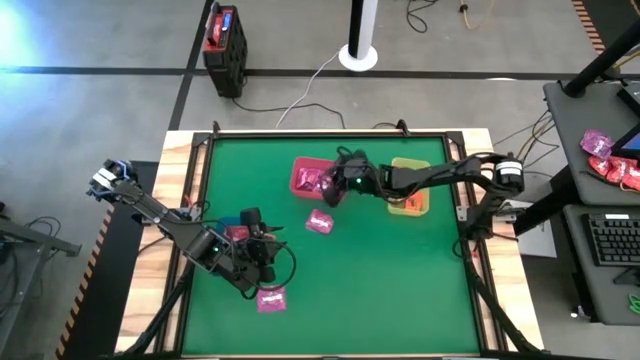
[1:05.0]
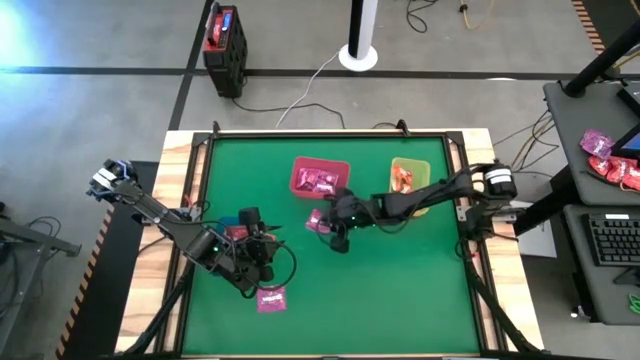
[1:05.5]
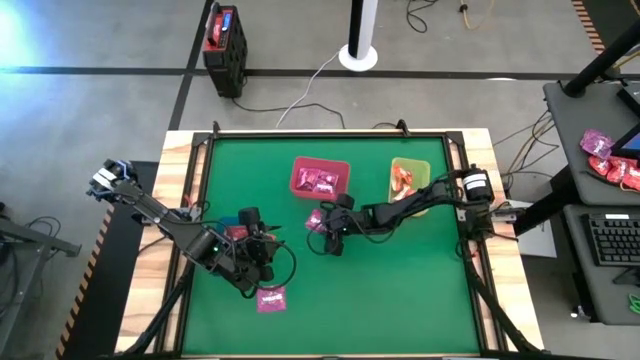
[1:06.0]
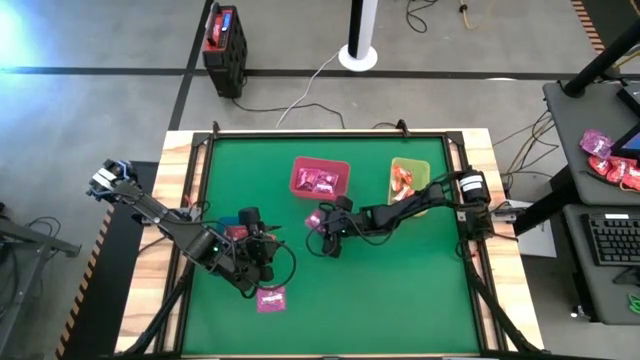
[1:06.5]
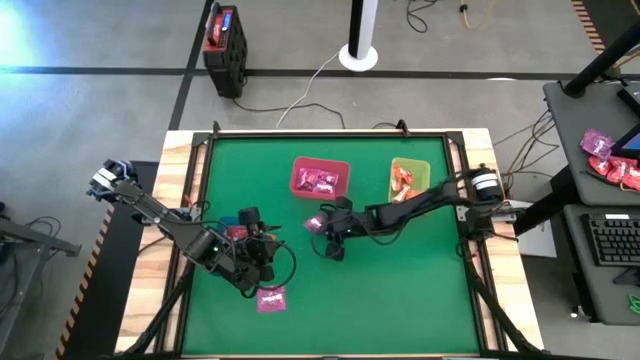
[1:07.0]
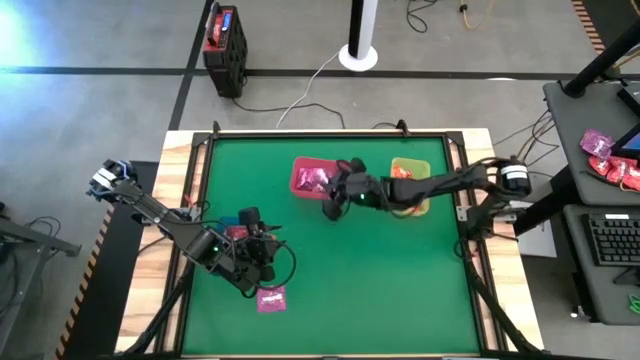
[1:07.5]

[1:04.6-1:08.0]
Task: Sort candy by brand, put in halloween buckets
Put the violet candy into the red bin

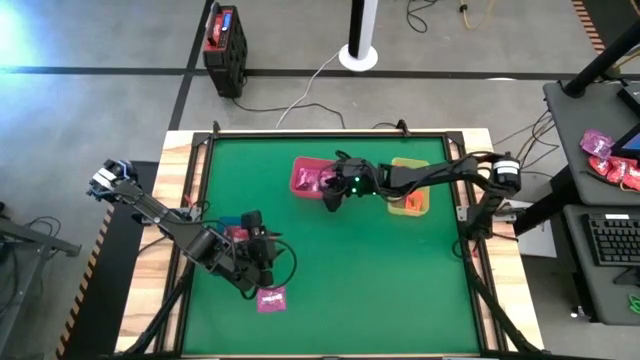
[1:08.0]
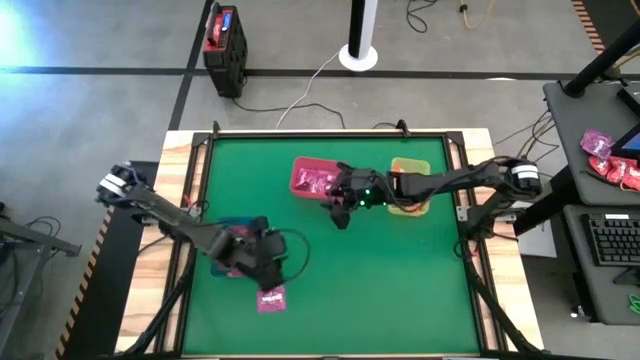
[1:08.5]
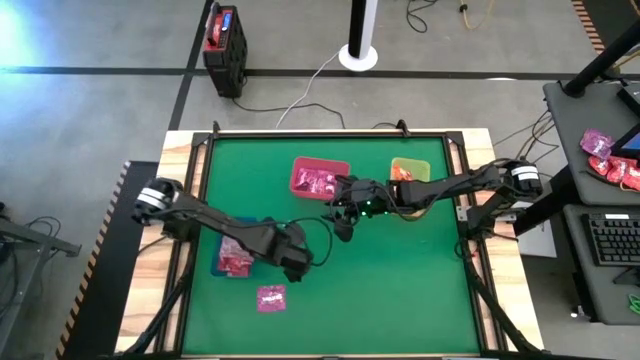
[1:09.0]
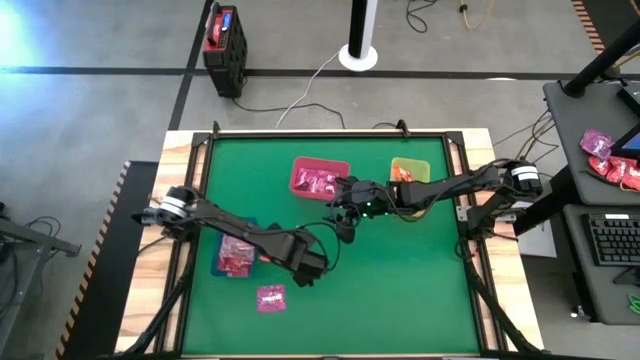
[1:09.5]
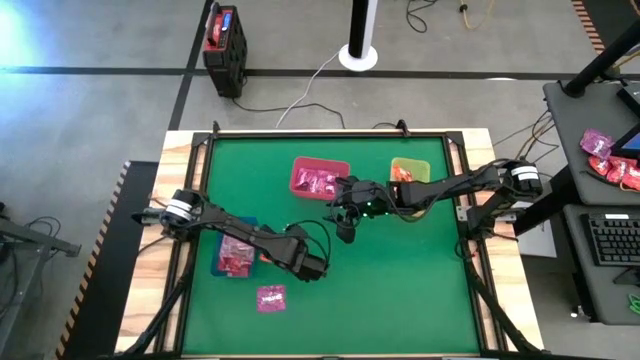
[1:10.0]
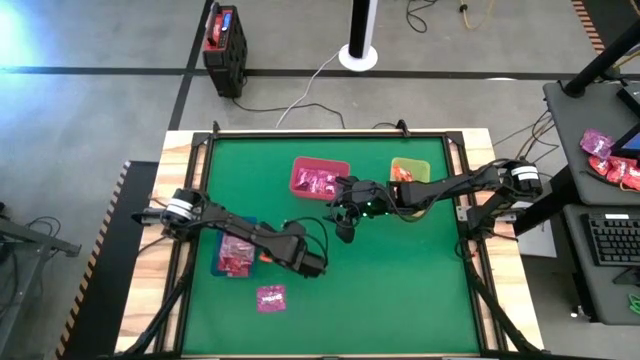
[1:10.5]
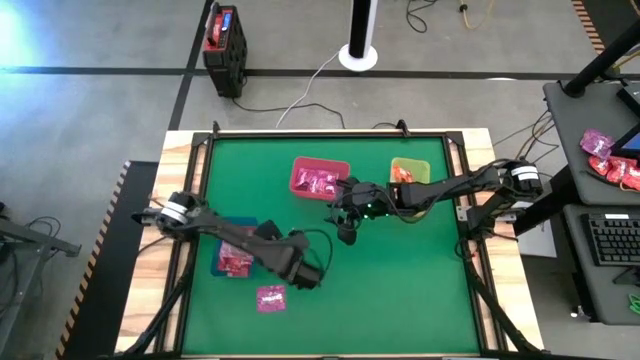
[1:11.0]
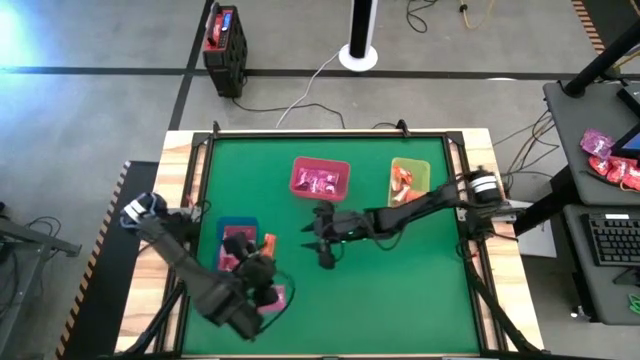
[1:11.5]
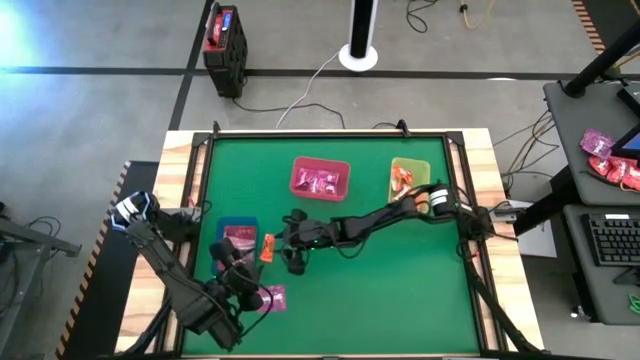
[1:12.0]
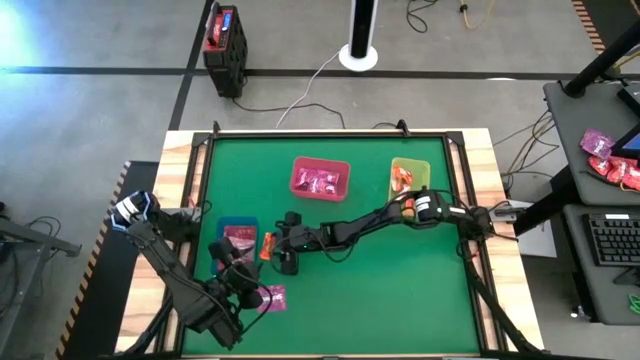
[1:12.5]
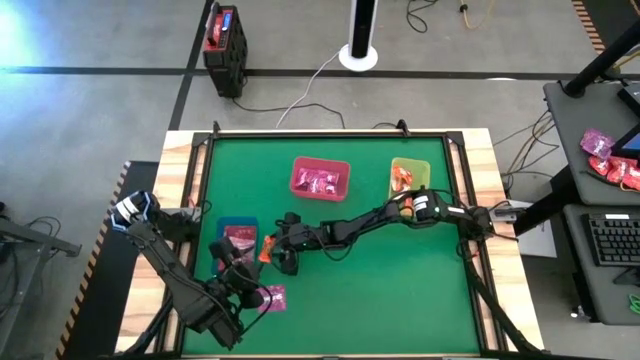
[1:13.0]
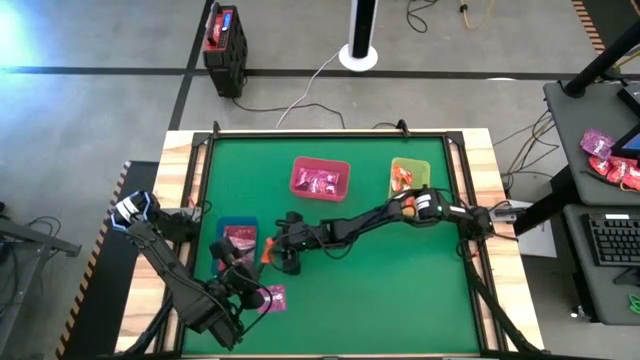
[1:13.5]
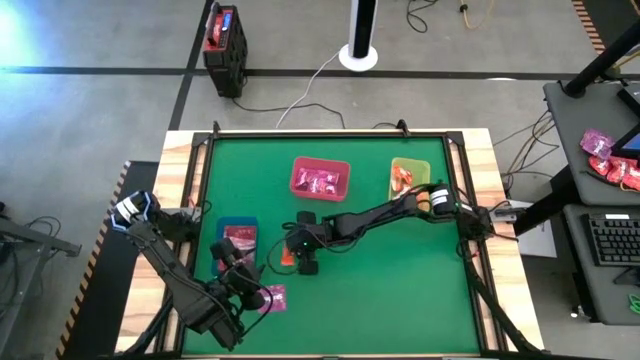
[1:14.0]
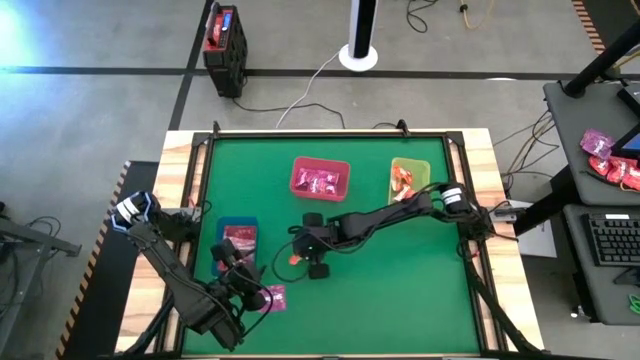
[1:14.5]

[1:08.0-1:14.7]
Put the orange chocolate into the yellow bin

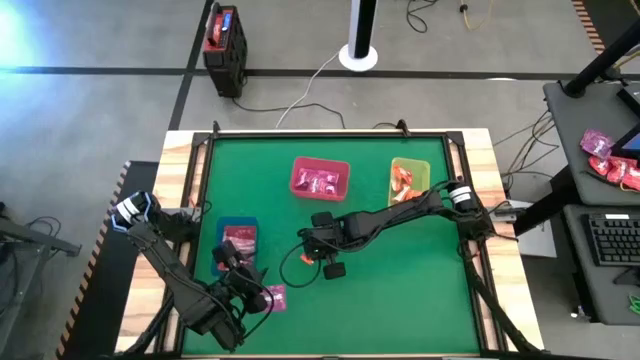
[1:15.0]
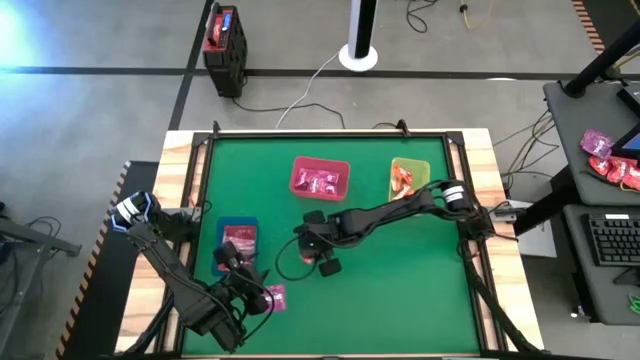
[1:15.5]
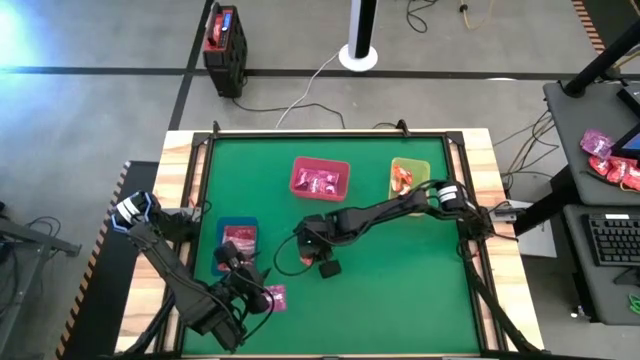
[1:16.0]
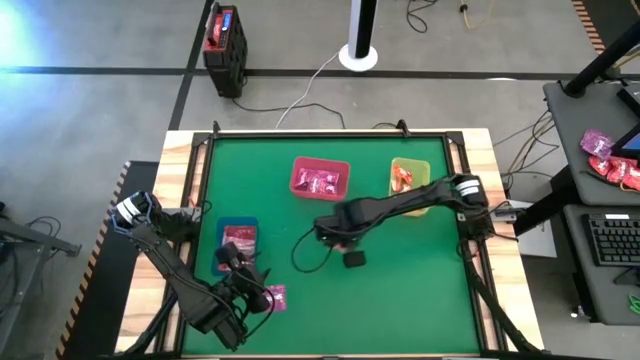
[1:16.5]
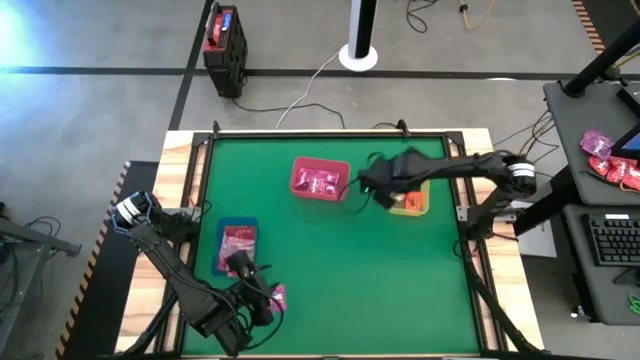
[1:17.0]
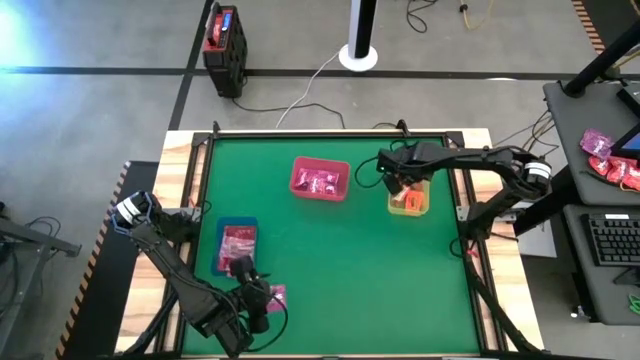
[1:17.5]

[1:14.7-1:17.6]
Put the orange chocolate into the yellow bin

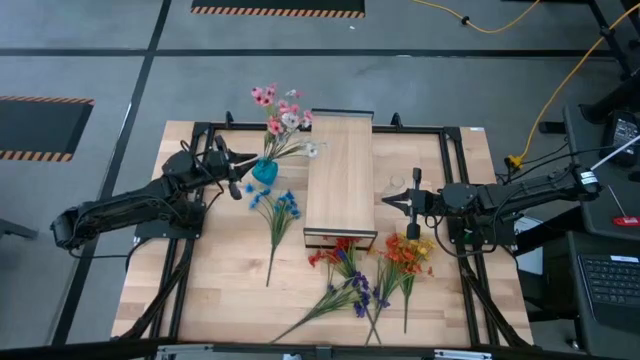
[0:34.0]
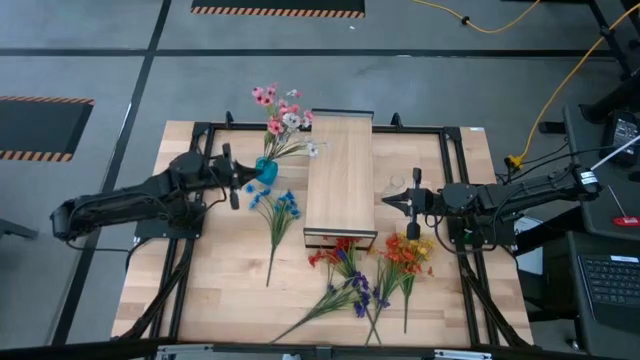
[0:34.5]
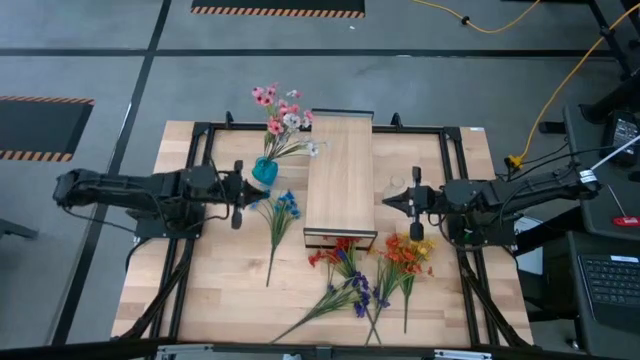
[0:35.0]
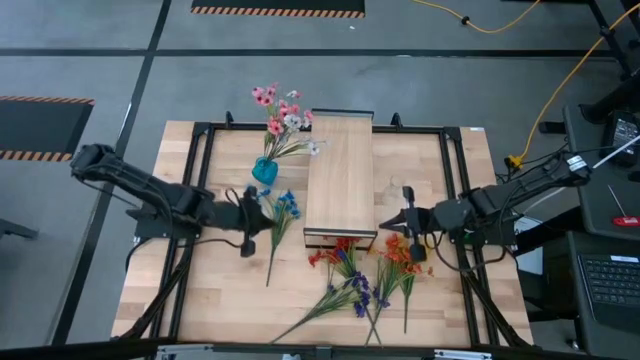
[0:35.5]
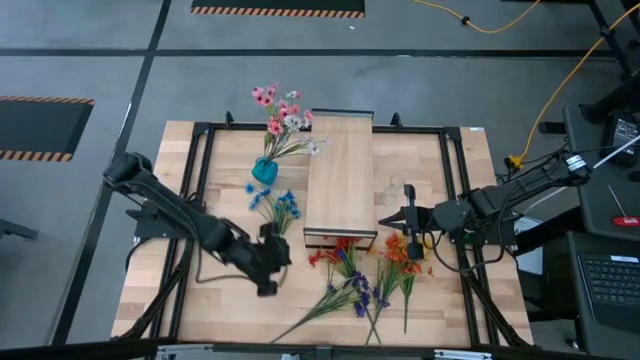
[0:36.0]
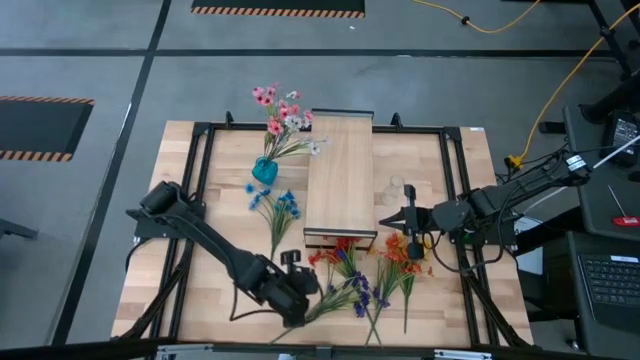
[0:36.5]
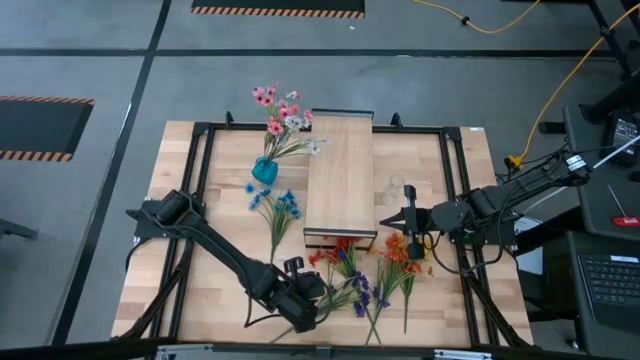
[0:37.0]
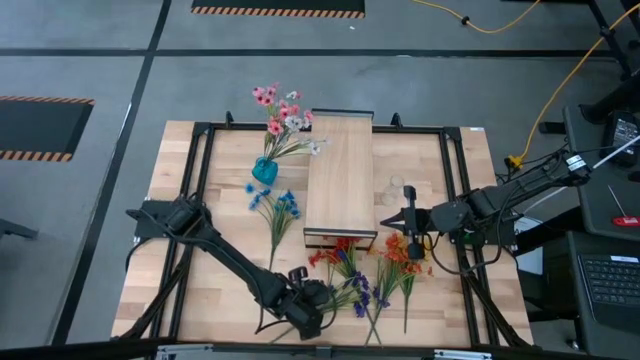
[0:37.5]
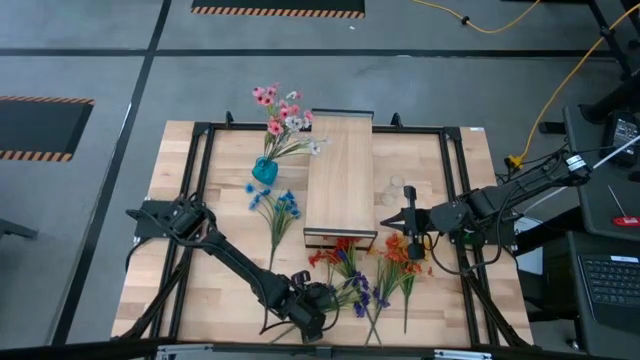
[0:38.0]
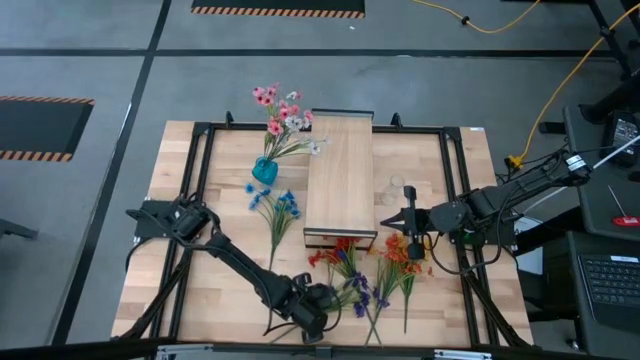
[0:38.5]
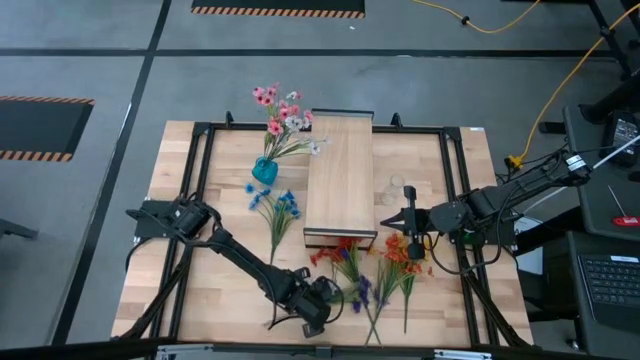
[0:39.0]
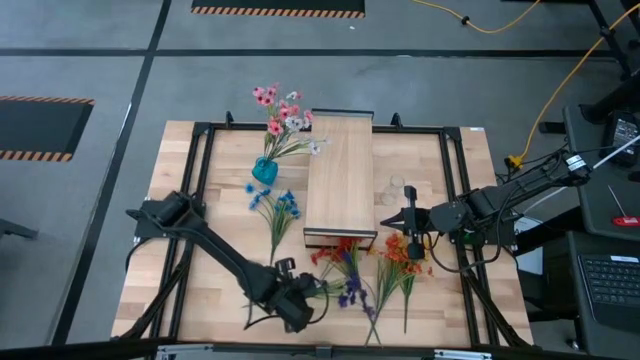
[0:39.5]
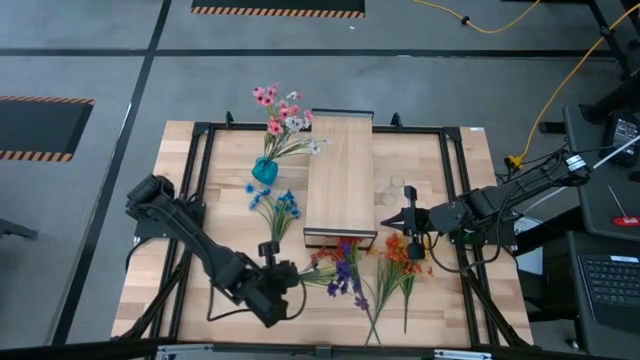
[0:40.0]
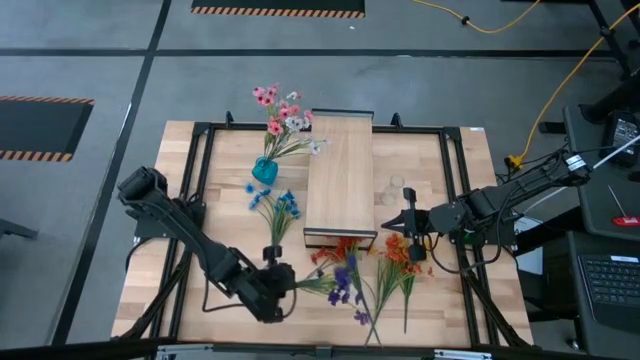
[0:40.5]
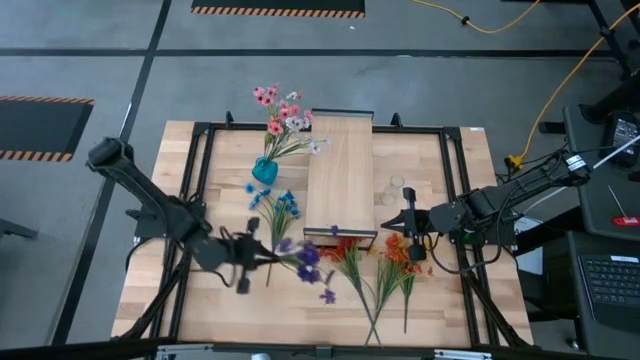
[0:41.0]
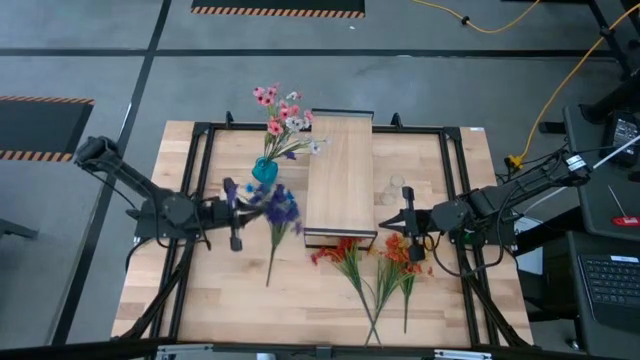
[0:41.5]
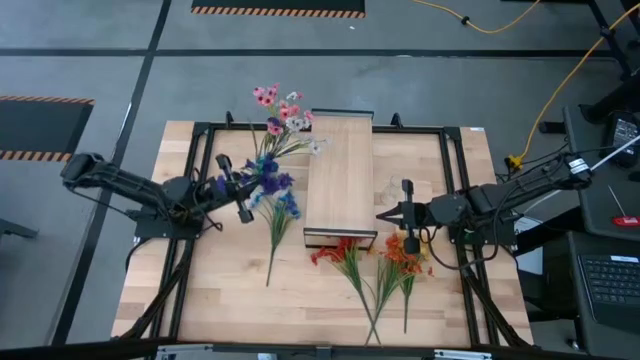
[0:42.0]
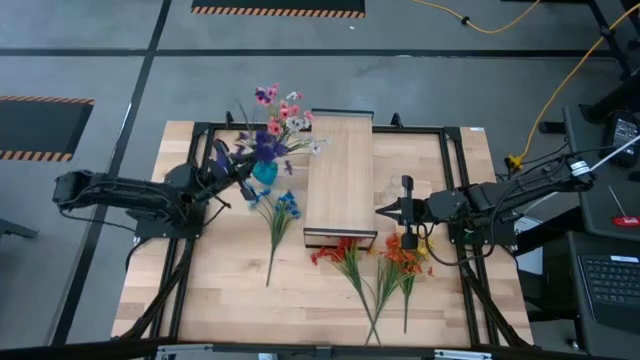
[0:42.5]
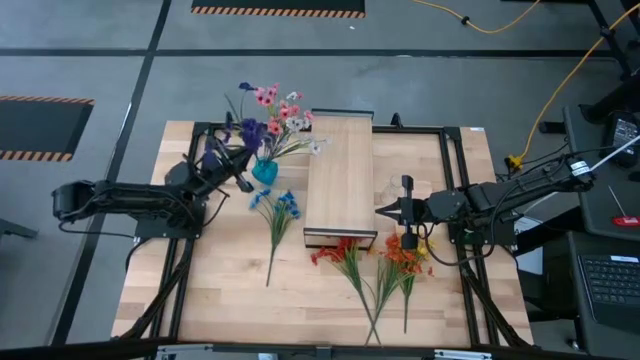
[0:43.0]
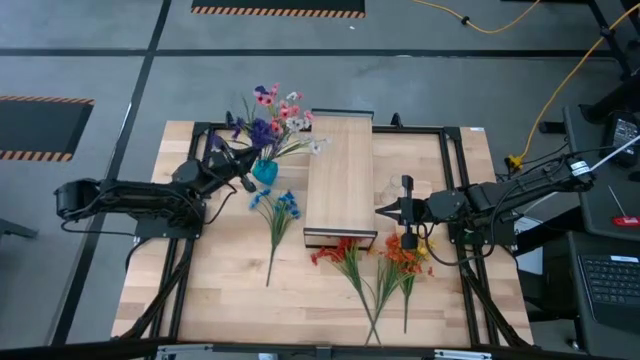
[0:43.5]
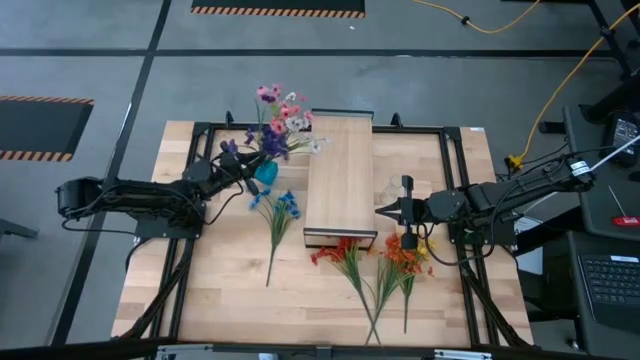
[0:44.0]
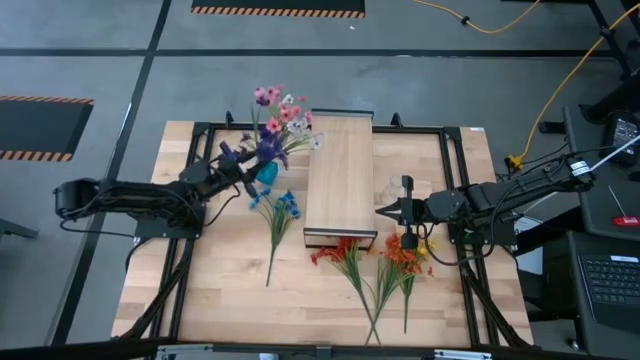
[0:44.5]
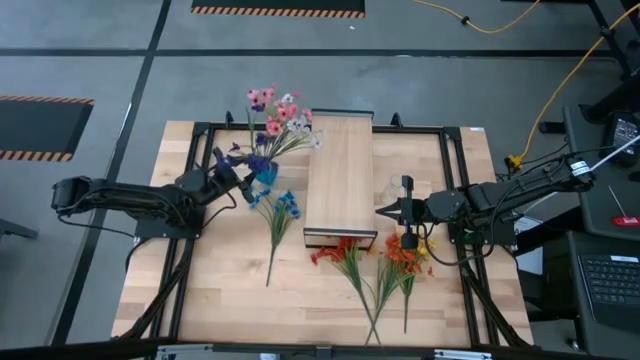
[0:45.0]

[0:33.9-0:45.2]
Task: Pick and place flowers into a vace then onto a shelf
Put the violet flowers into the blue vase
